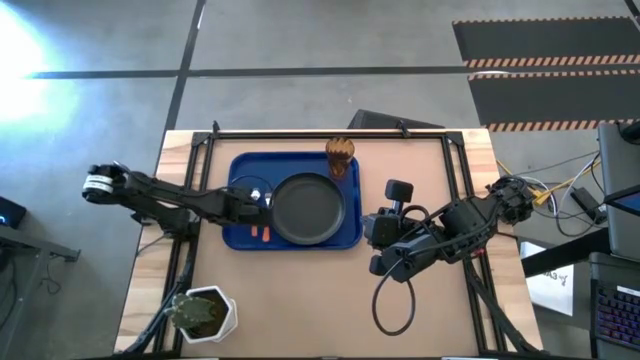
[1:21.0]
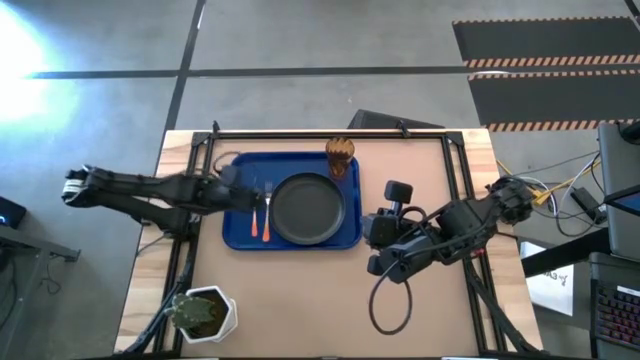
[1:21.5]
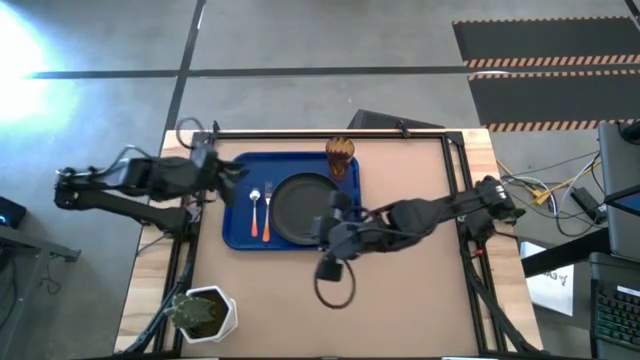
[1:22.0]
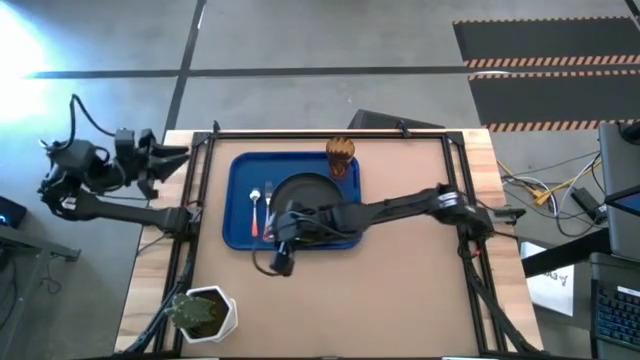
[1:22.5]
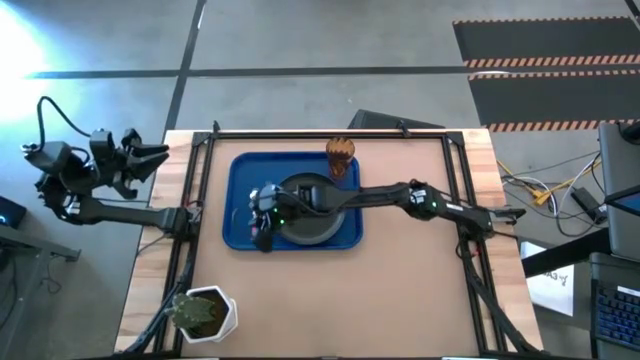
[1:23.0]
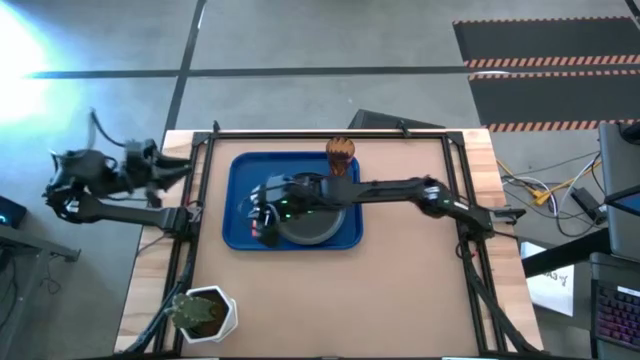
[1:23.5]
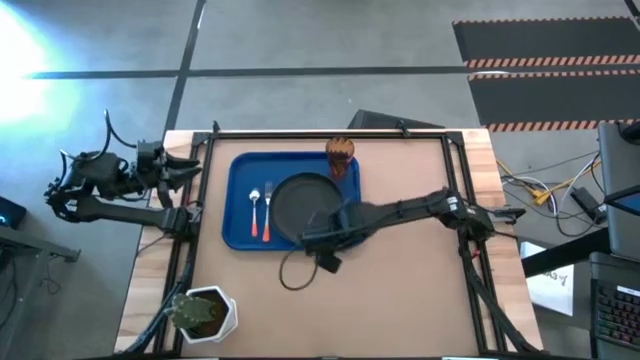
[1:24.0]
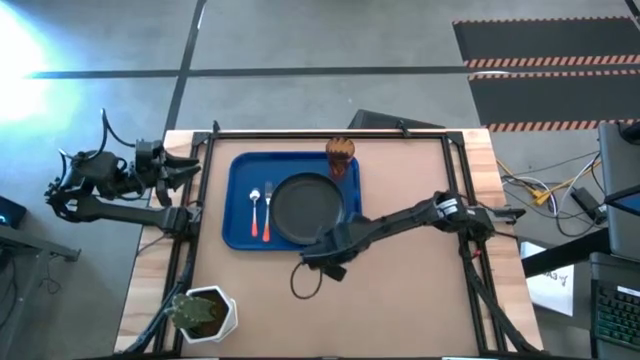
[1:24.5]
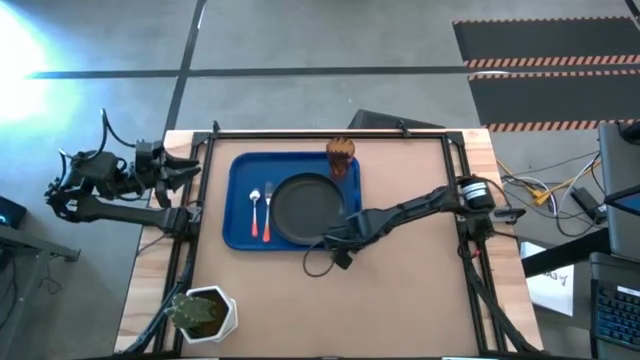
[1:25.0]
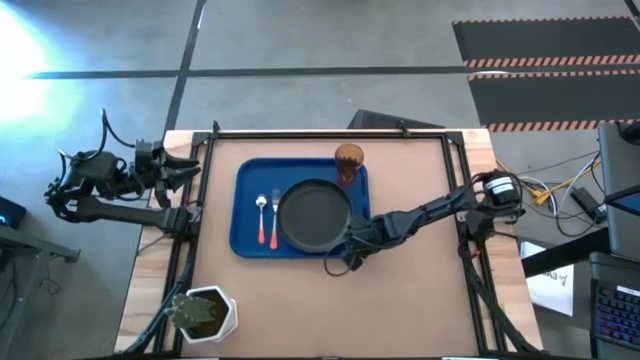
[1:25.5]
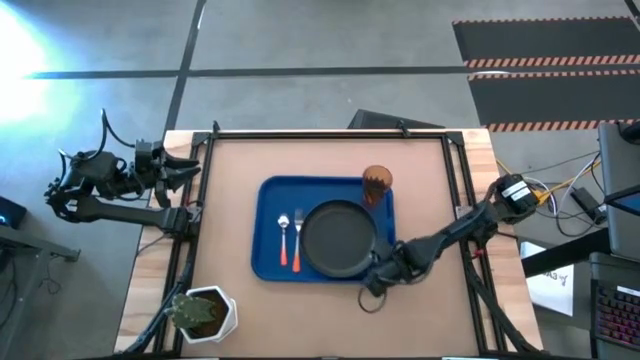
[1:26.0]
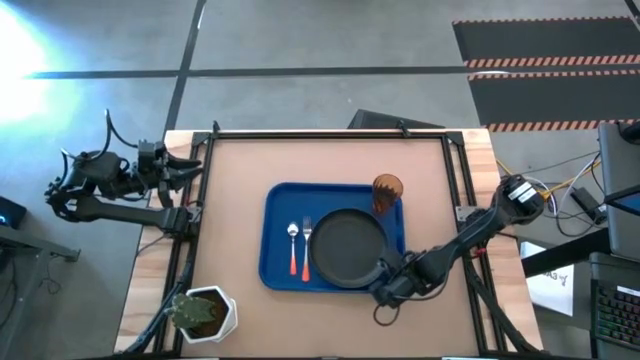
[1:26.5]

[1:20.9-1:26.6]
Task: Pick and place plate/cup/fork/spoon on tray
Move the blue tray to the center of the table

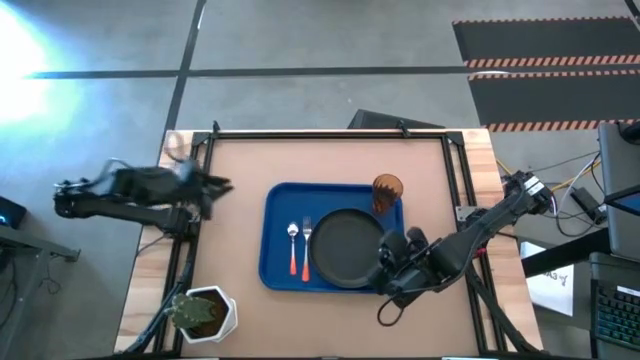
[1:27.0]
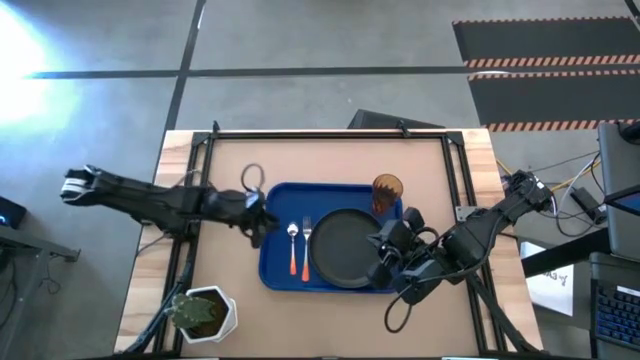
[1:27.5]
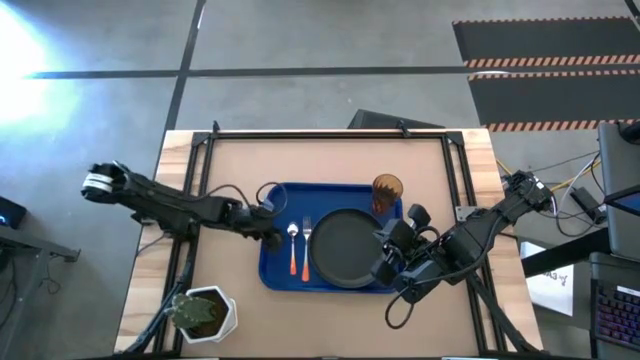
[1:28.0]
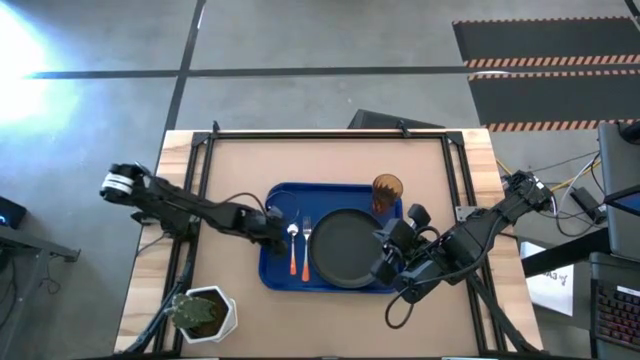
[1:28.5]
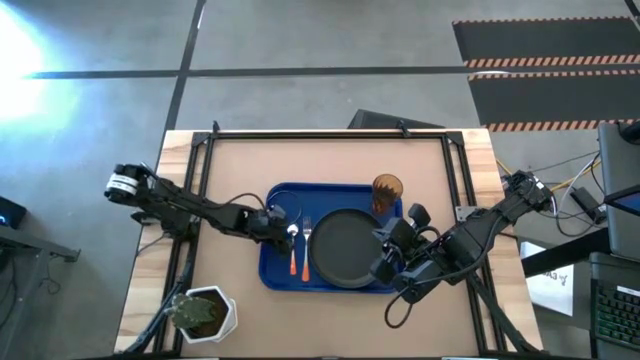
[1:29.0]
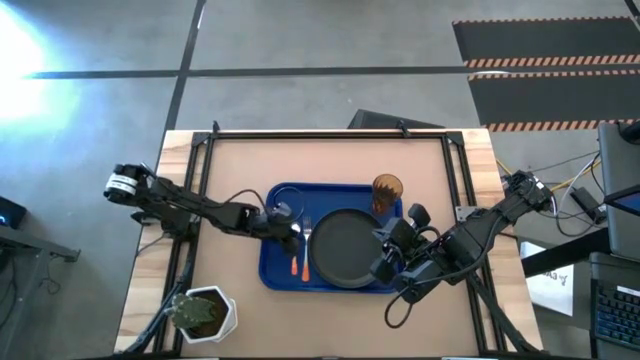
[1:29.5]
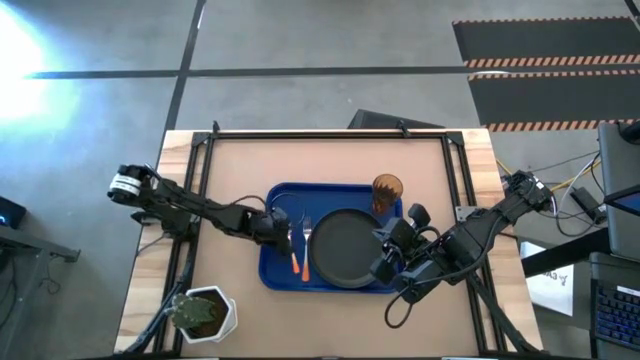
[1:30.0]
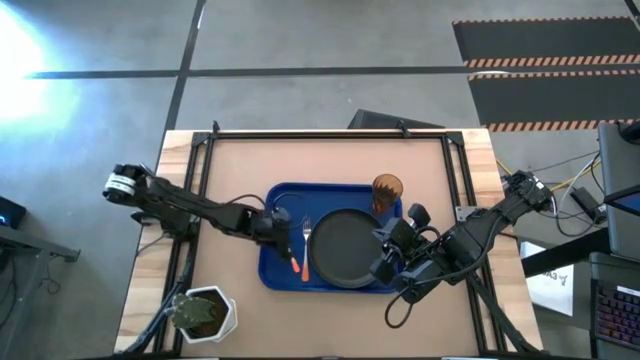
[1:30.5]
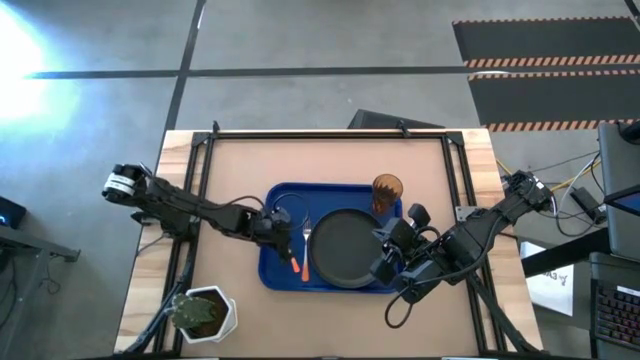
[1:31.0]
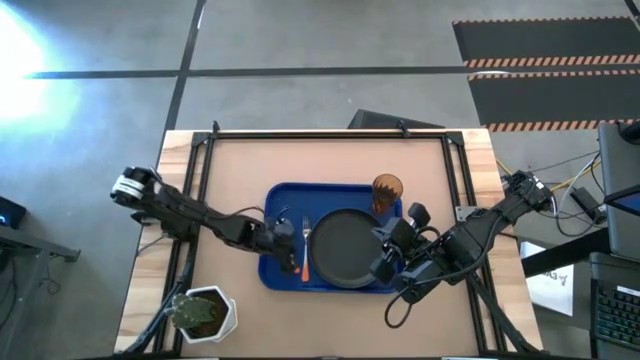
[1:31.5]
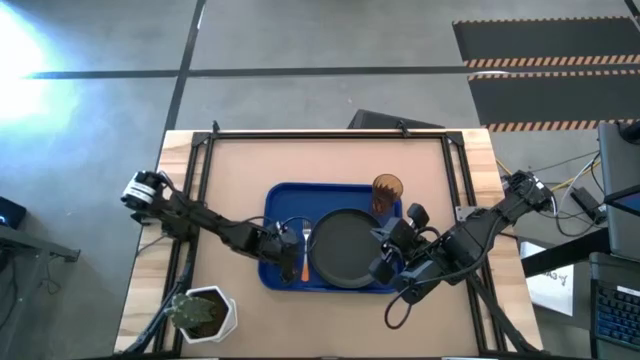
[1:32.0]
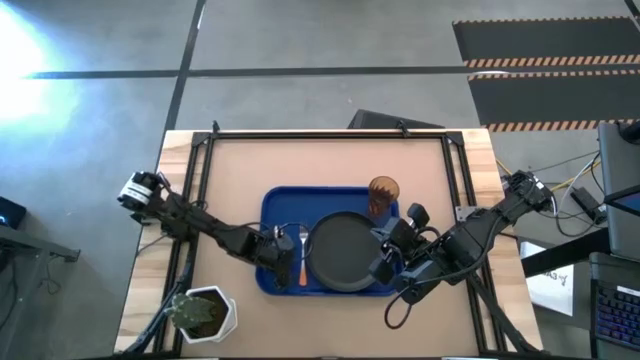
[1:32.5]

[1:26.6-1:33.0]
Adjust the orange spoon on the blue tray

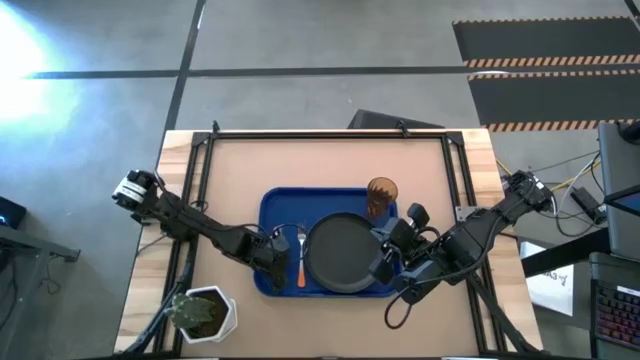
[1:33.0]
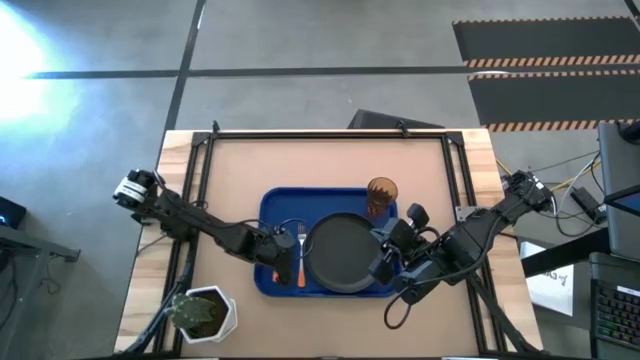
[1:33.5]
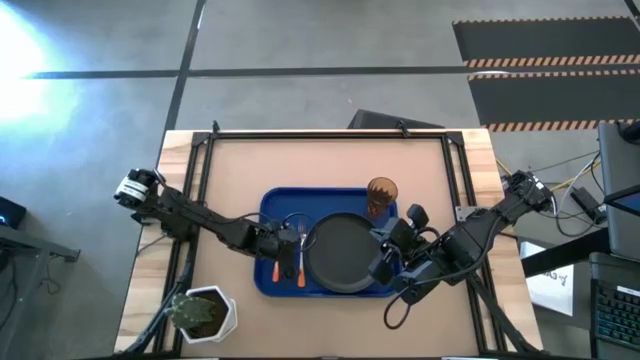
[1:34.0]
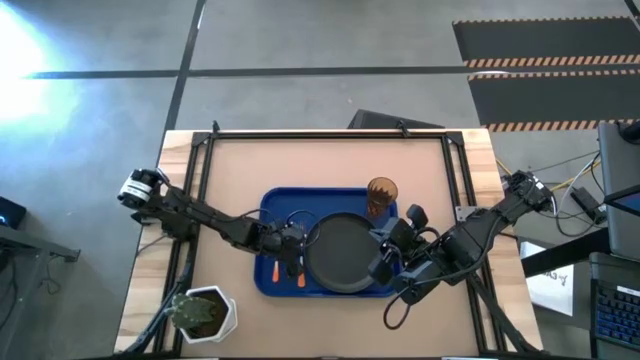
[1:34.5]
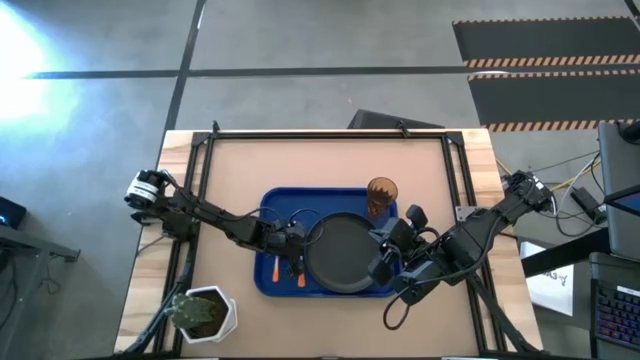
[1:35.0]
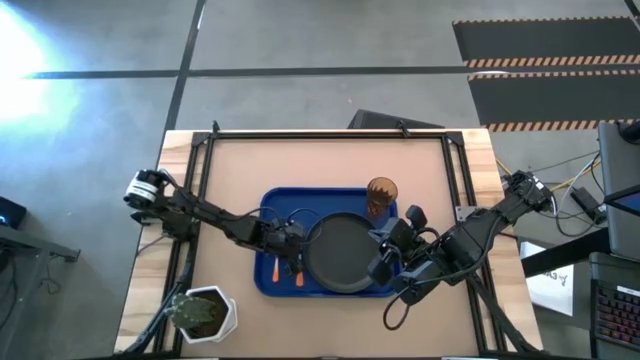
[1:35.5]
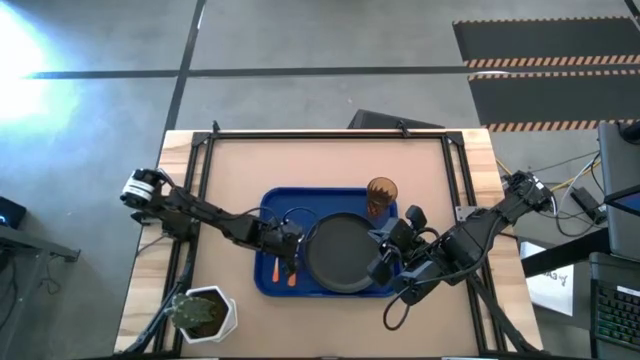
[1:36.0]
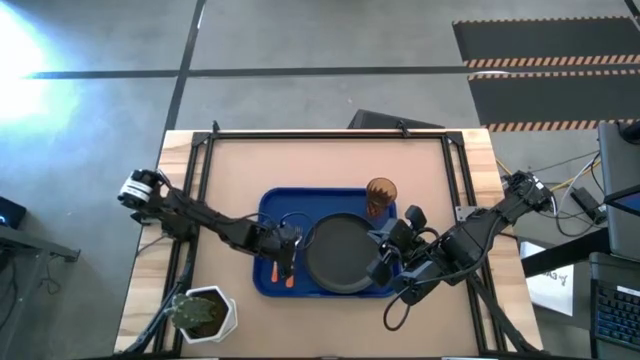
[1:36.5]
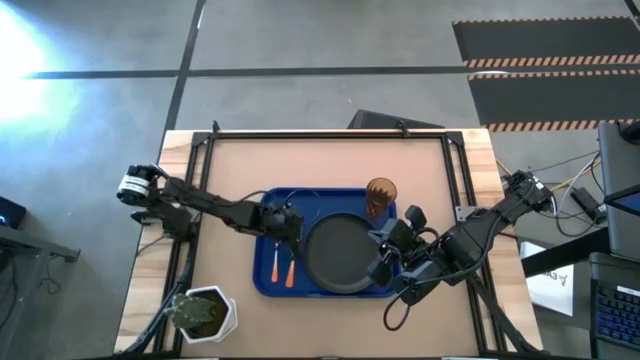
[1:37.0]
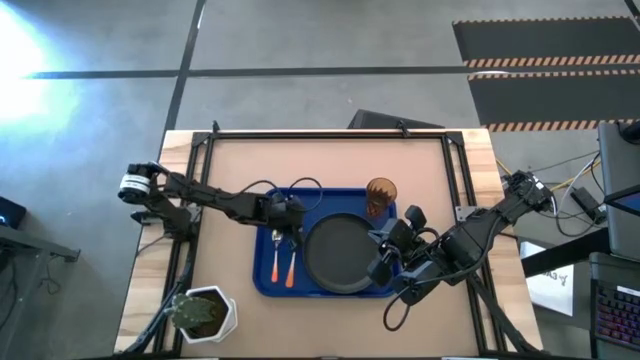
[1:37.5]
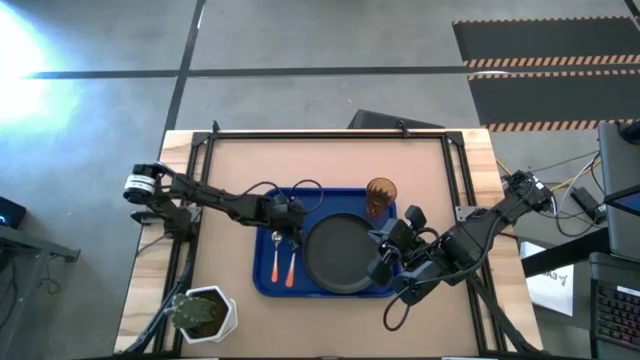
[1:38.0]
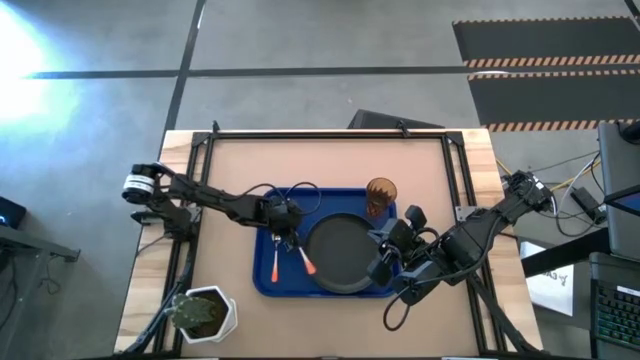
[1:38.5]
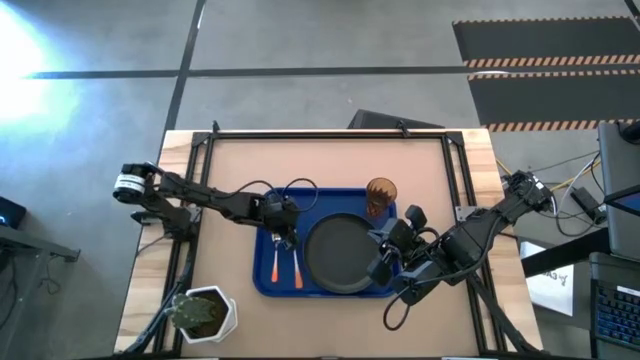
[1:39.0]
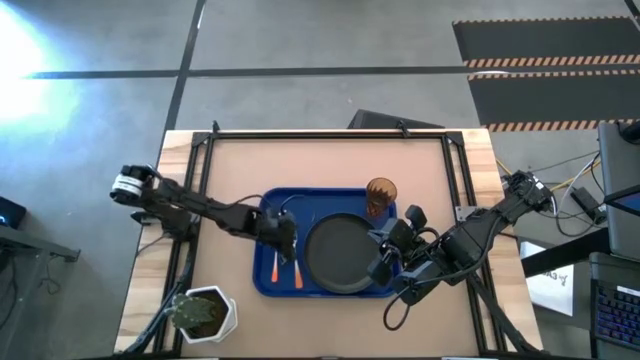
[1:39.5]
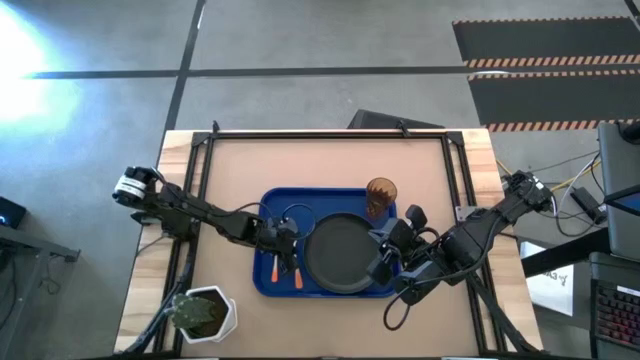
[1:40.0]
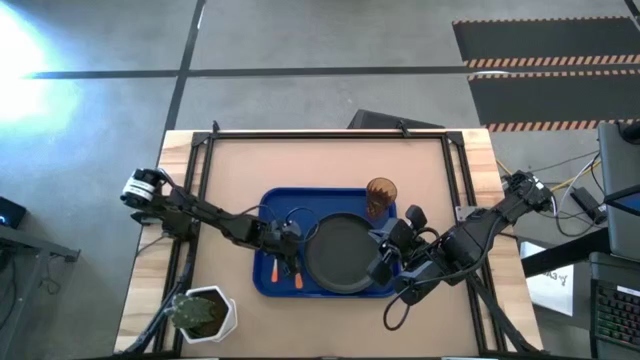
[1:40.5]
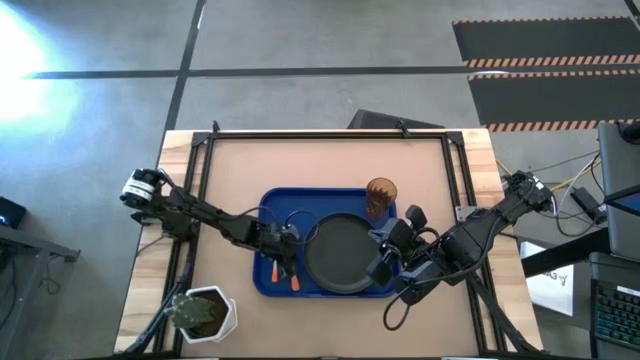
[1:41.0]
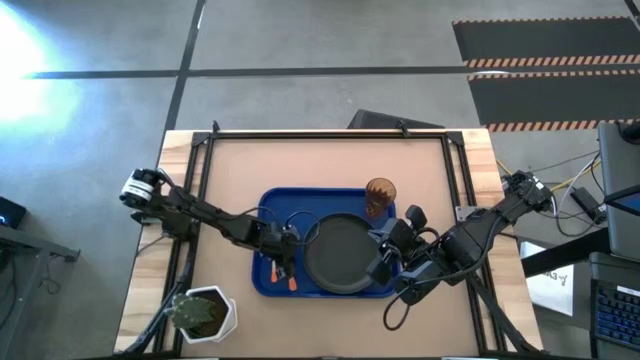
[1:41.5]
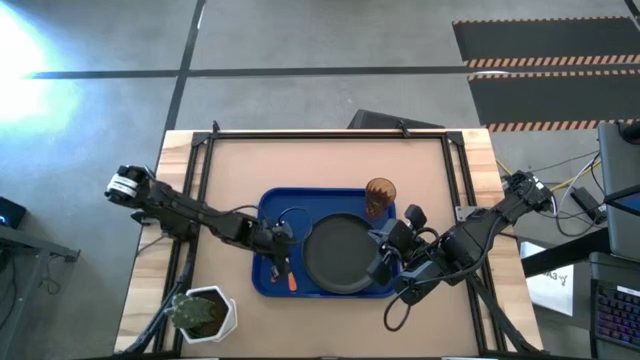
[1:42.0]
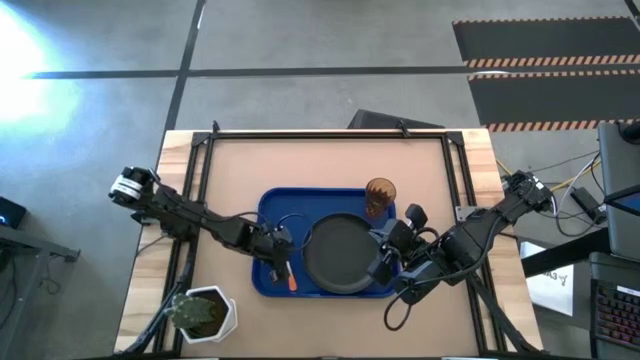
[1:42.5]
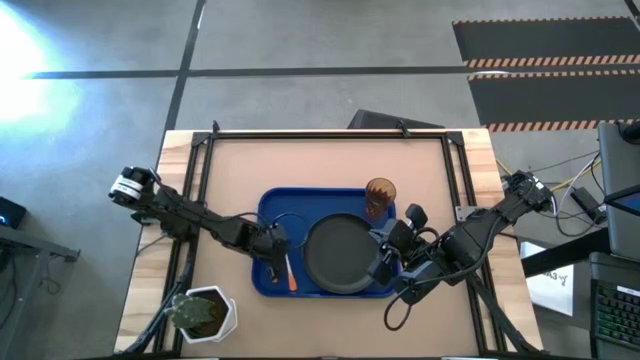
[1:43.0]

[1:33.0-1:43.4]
Adjust the orange fork on the blue tray
